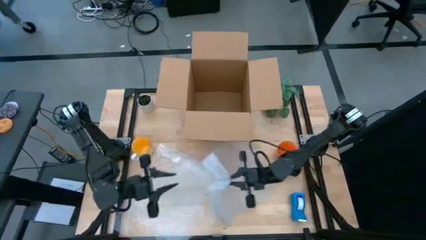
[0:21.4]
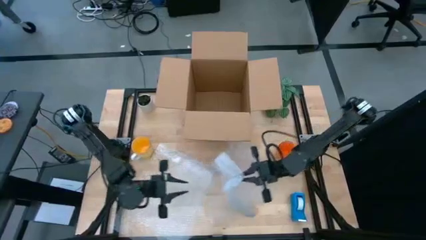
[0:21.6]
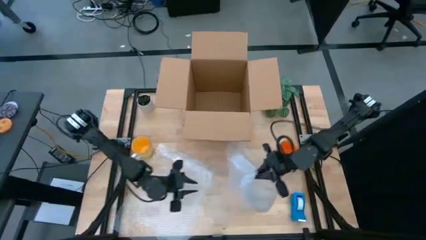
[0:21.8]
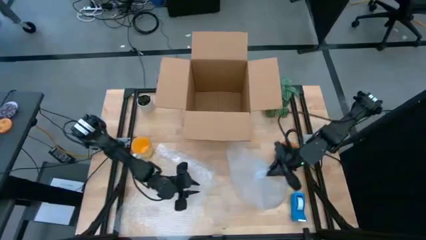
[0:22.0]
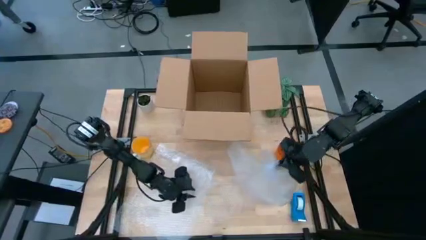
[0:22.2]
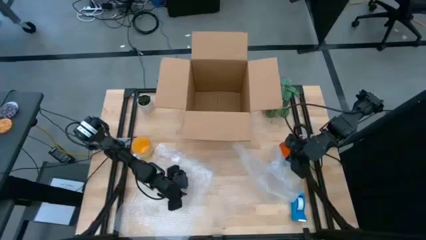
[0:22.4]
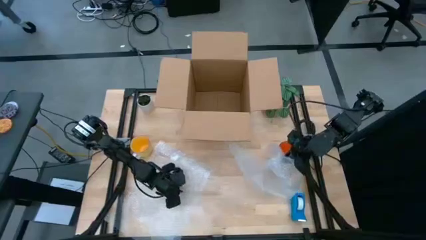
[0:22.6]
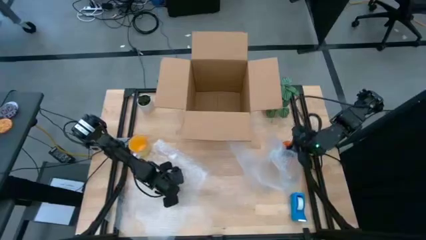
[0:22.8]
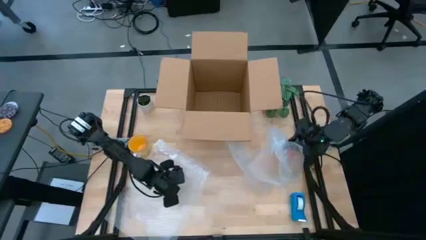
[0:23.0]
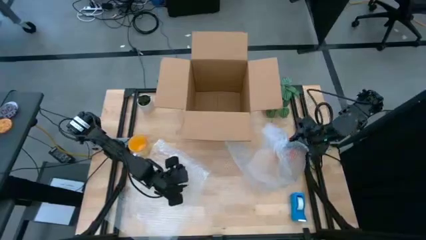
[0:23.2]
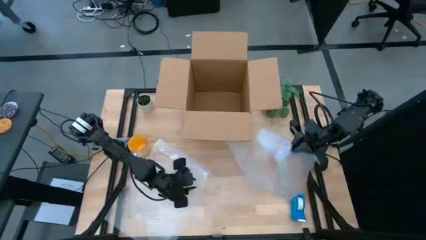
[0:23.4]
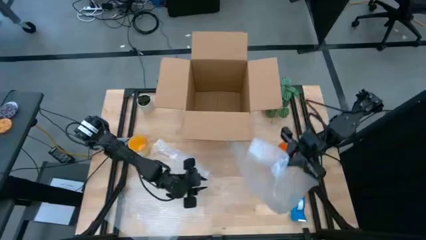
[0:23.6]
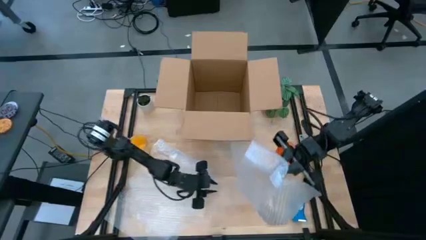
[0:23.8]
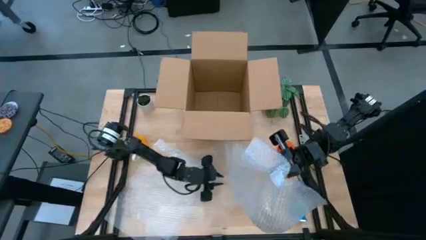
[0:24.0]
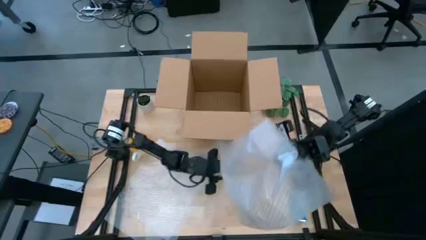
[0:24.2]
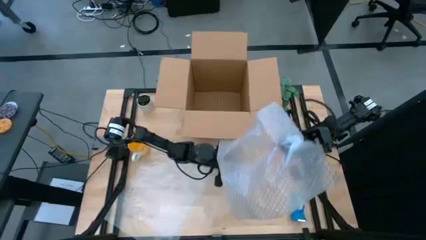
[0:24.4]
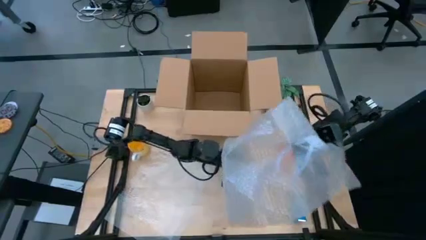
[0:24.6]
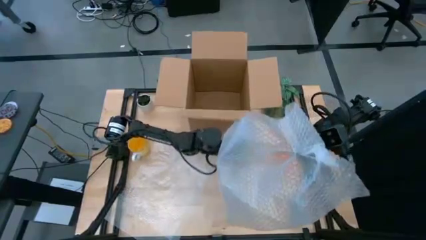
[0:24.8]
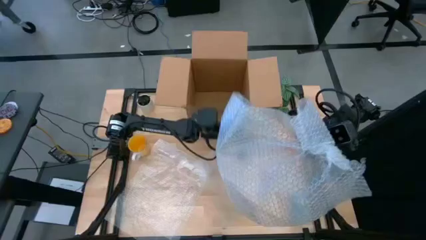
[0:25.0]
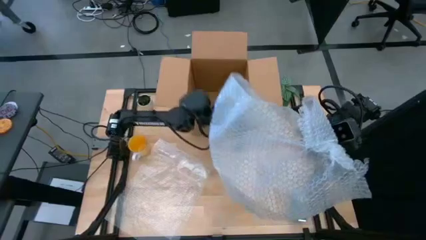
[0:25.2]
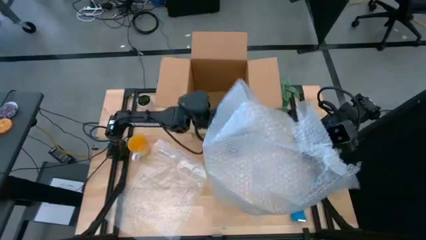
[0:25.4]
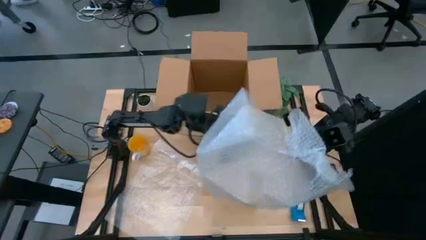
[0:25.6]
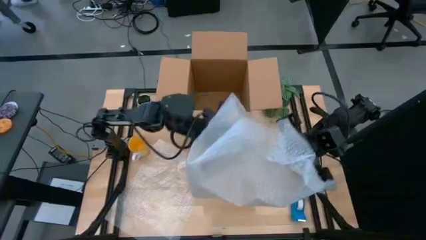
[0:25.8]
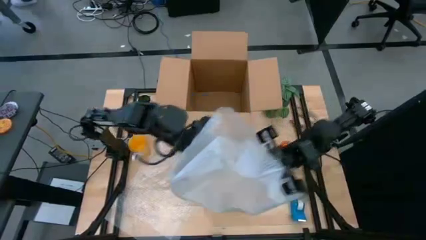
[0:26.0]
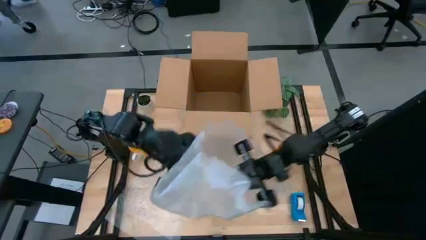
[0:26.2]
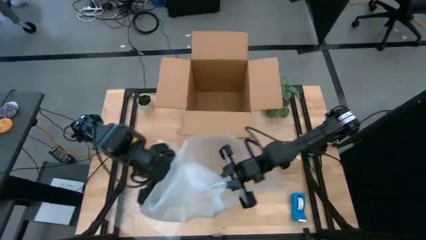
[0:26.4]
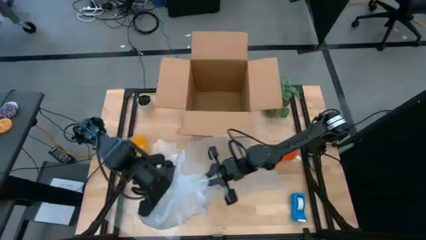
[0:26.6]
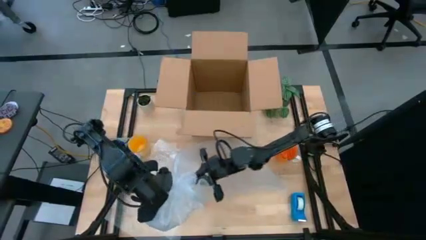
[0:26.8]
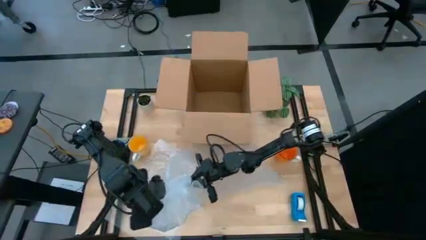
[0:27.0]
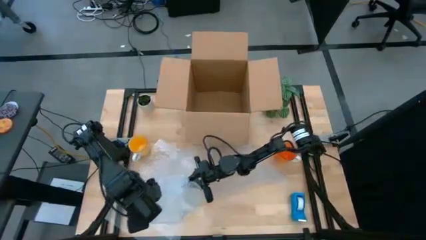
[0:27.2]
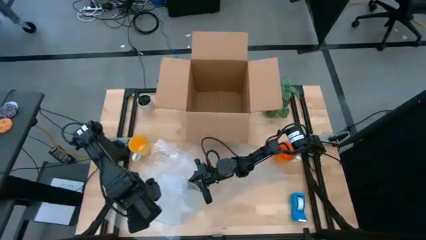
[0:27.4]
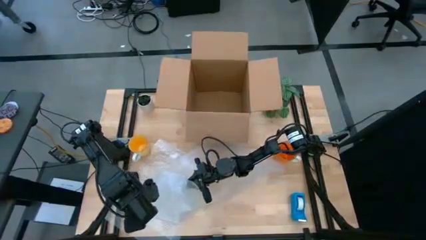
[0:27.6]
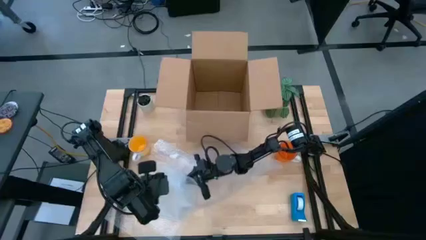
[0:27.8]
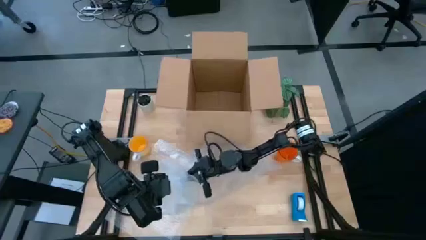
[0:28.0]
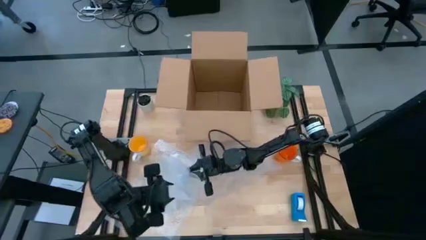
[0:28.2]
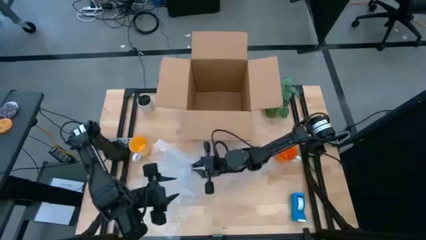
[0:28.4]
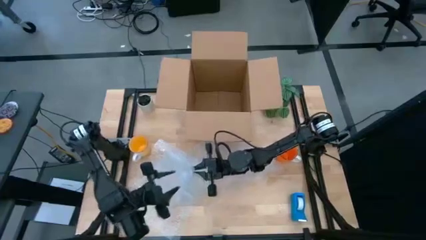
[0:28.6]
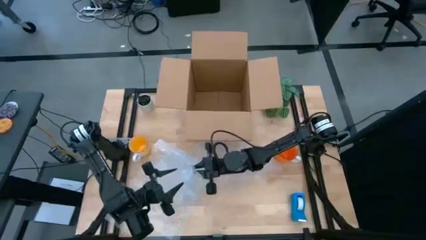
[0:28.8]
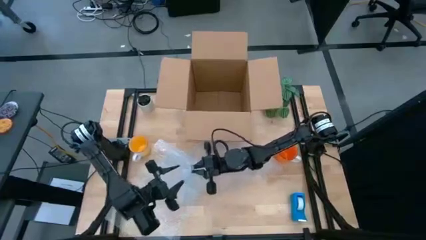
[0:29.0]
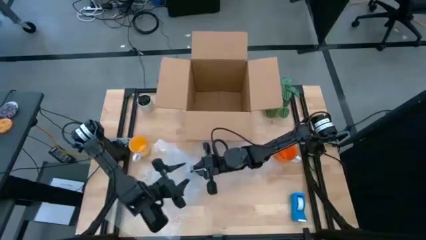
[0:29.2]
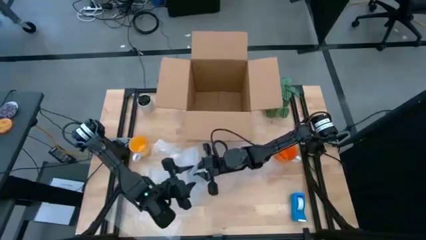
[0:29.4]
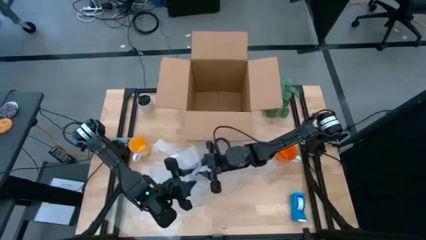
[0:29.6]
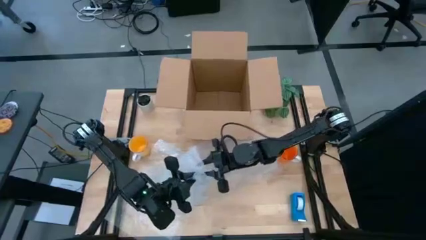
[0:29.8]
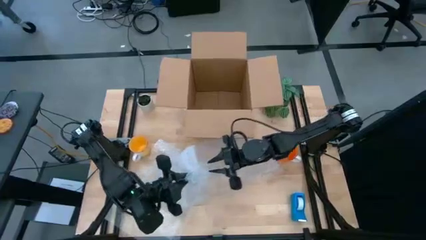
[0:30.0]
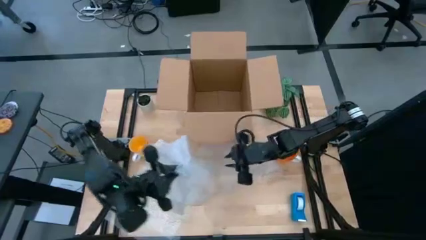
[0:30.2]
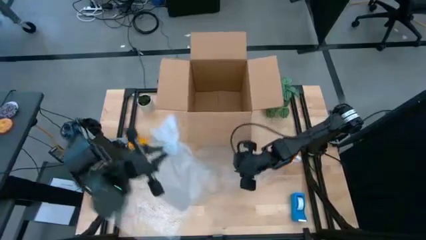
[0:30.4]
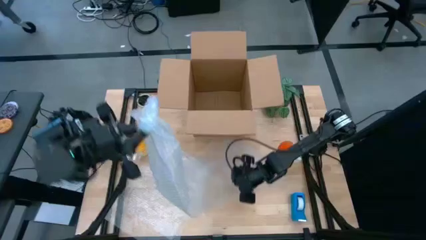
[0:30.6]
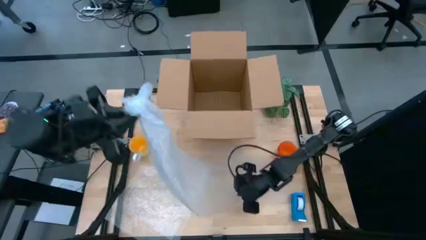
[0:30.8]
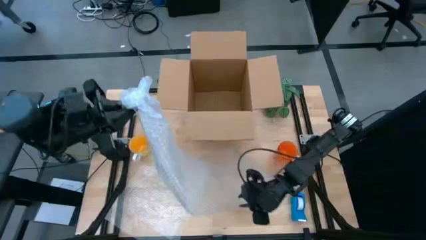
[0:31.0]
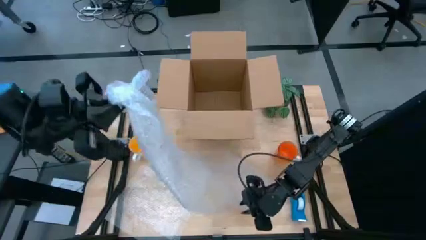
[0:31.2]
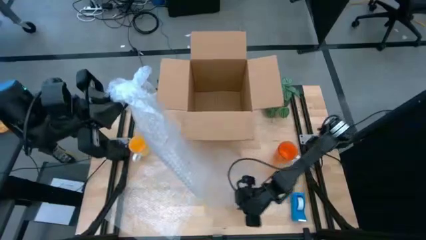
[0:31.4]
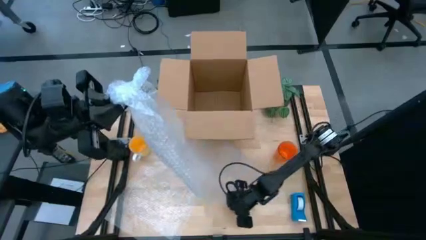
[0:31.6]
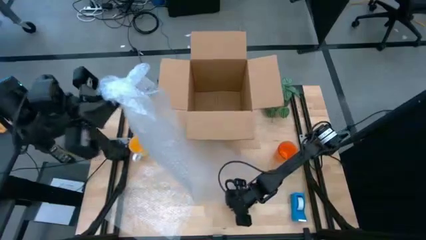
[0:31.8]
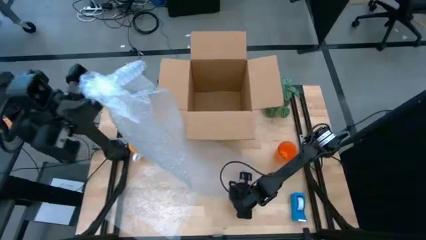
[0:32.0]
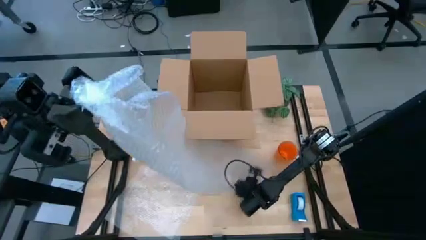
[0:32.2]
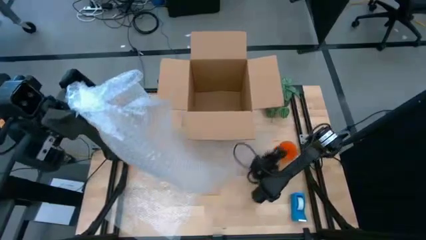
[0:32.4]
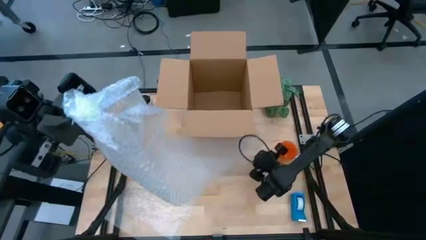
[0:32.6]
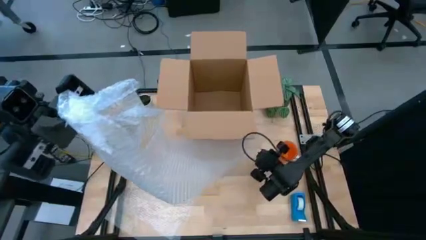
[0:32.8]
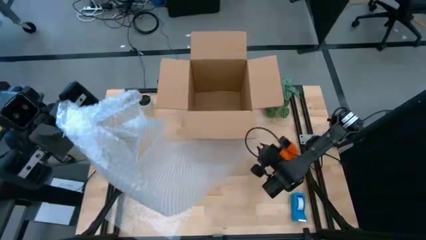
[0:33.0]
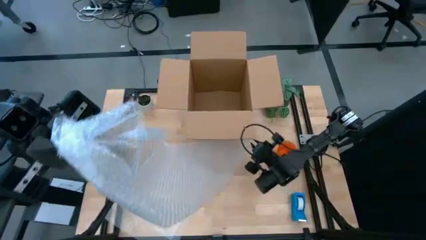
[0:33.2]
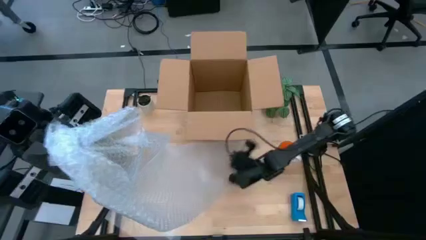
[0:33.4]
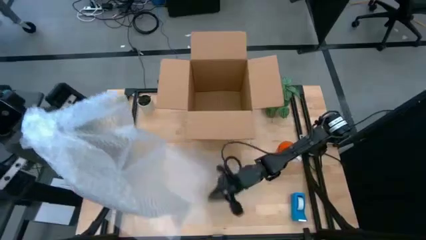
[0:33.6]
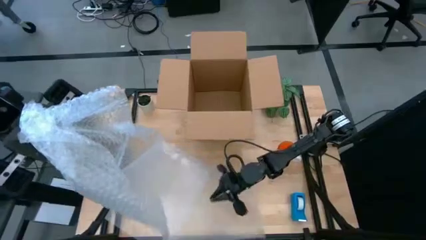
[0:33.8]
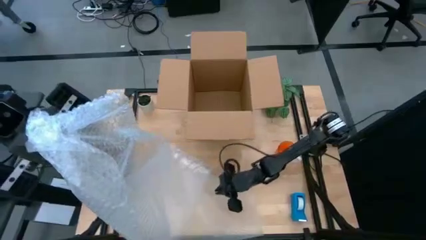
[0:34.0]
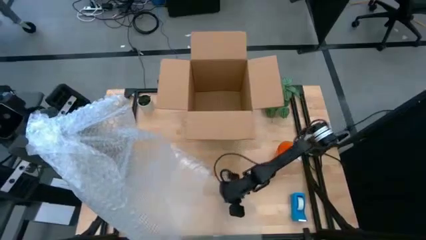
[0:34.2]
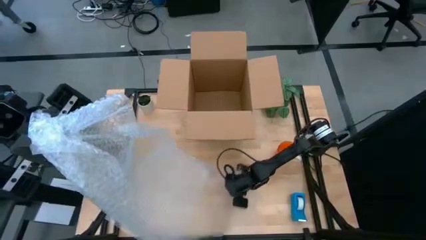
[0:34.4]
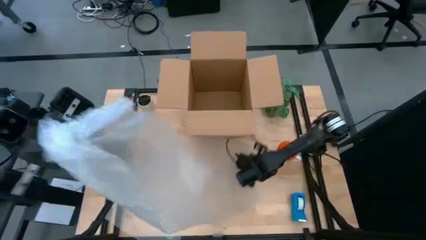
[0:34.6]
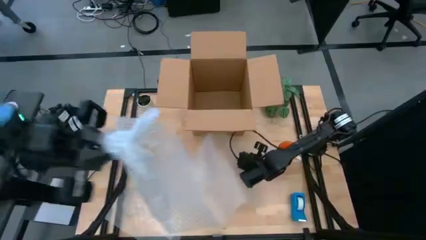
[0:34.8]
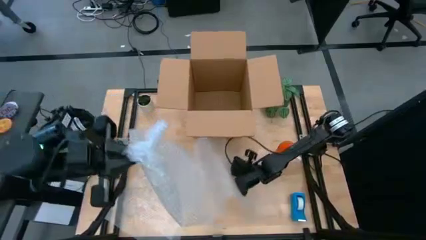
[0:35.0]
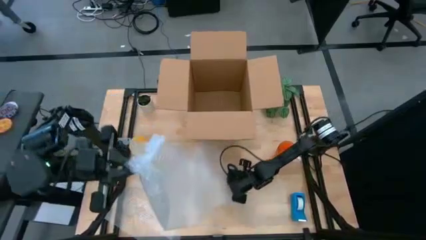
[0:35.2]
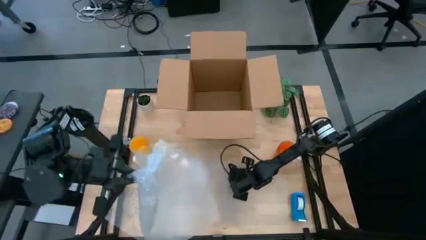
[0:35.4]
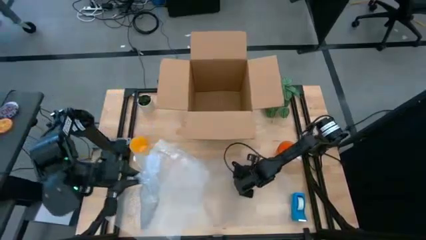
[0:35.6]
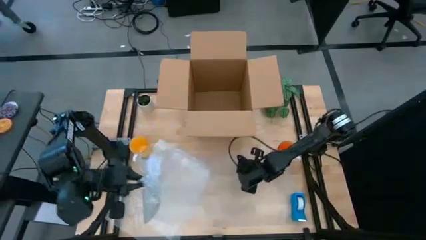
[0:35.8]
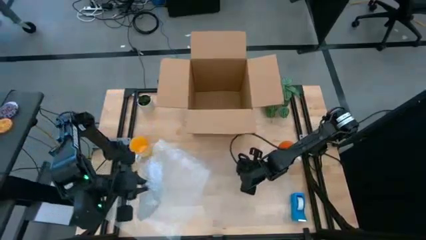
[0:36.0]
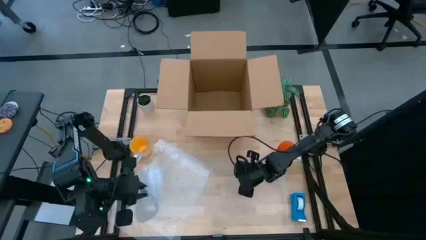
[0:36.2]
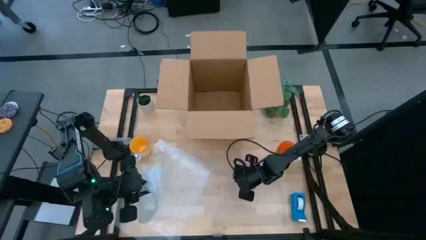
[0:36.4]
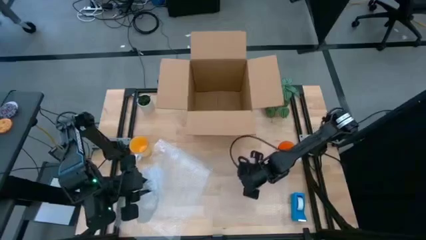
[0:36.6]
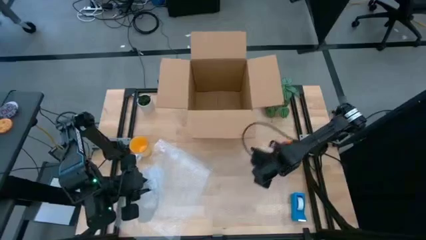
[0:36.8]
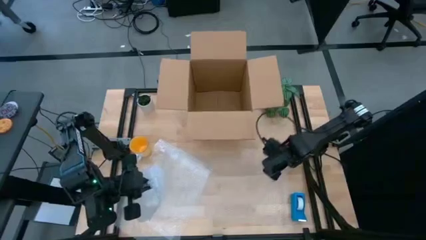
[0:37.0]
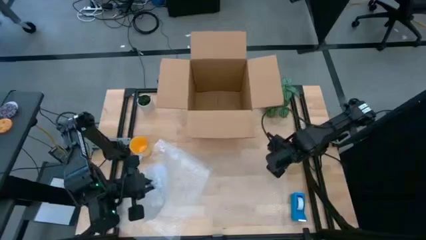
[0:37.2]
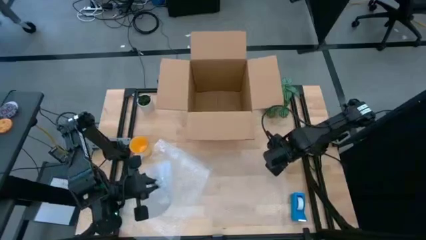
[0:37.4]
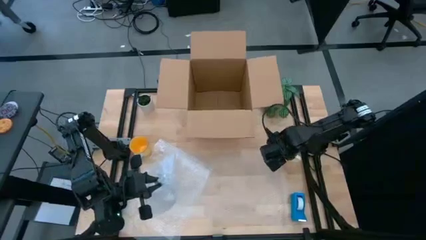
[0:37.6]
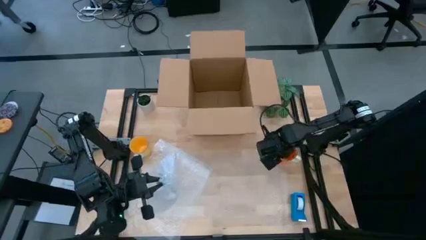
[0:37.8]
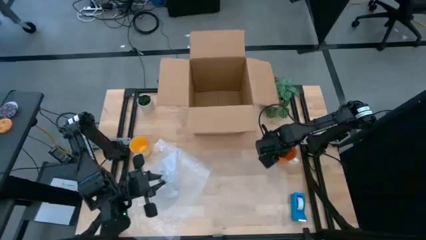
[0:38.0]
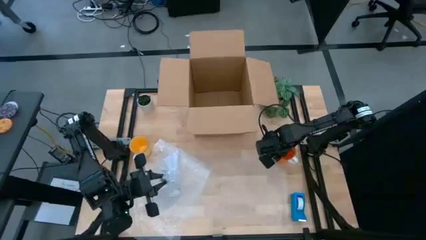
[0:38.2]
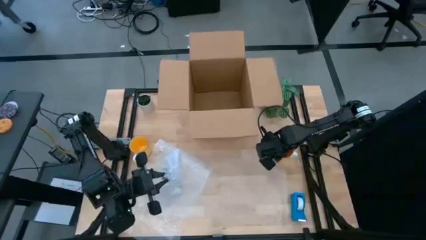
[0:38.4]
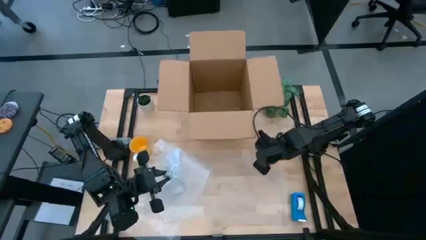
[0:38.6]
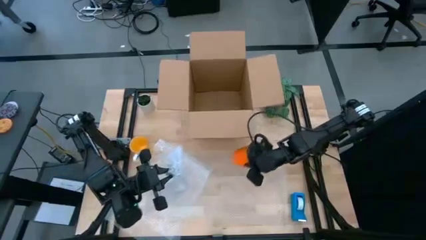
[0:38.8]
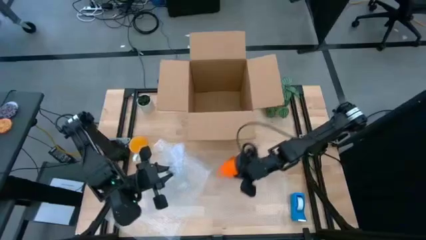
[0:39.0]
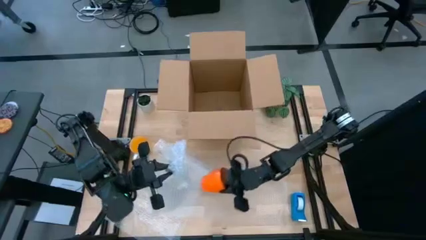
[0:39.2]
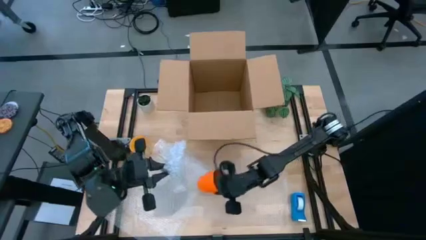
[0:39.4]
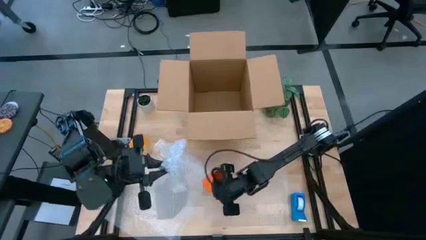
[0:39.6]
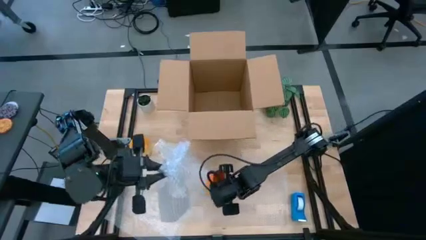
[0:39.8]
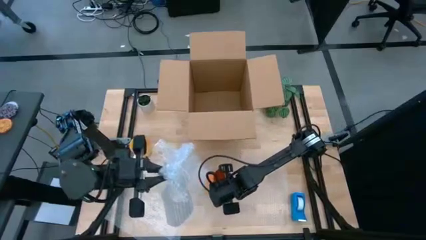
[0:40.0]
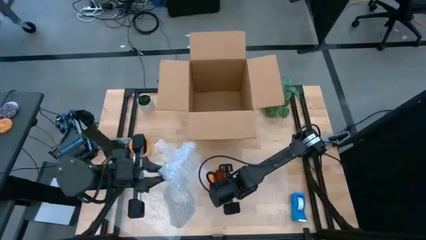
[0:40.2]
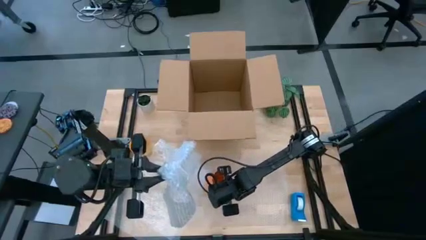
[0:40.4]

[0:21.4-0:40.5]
Task: wrap mug
Wrap the orange mug with the bubble wrap
